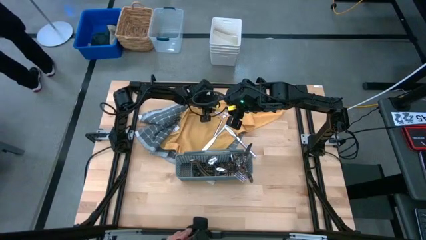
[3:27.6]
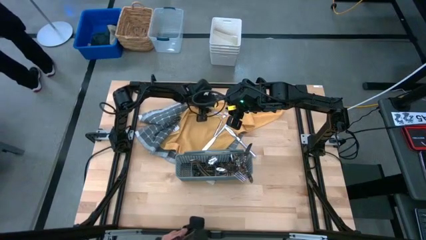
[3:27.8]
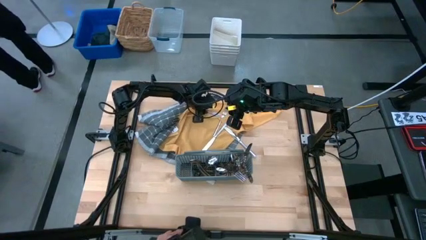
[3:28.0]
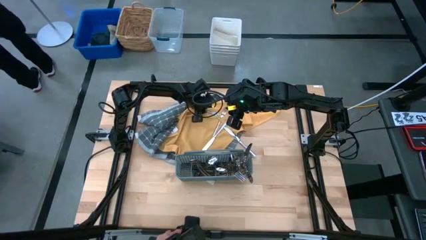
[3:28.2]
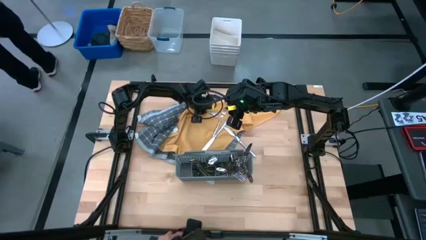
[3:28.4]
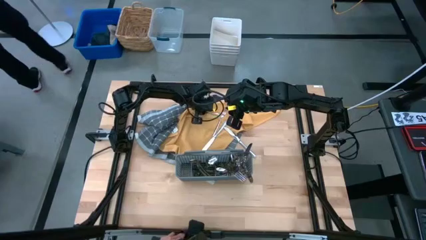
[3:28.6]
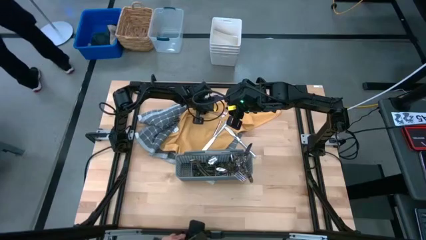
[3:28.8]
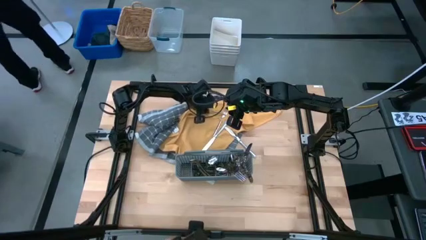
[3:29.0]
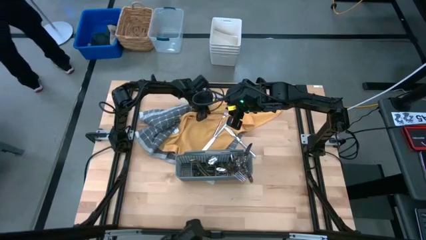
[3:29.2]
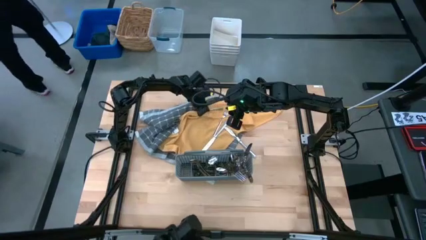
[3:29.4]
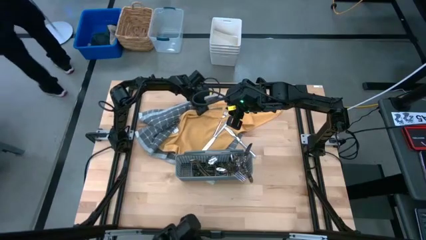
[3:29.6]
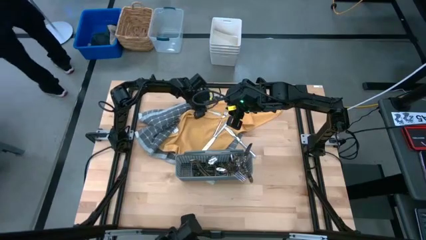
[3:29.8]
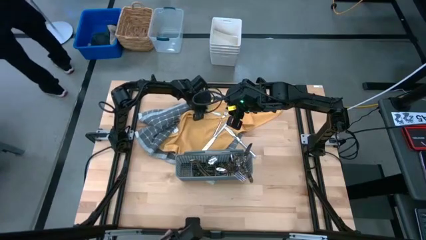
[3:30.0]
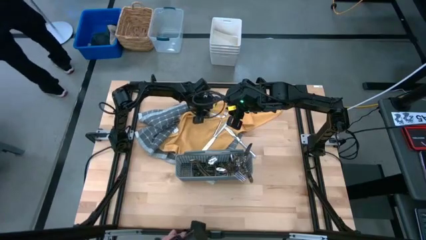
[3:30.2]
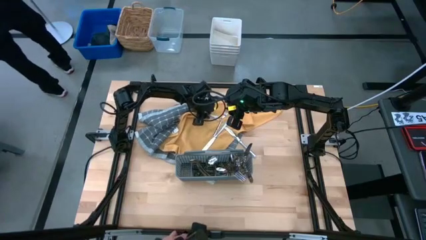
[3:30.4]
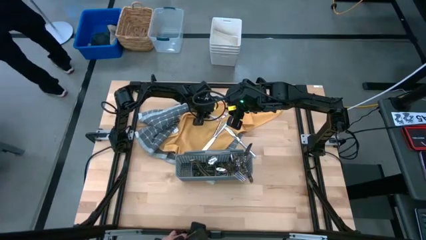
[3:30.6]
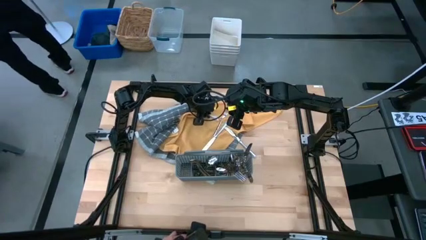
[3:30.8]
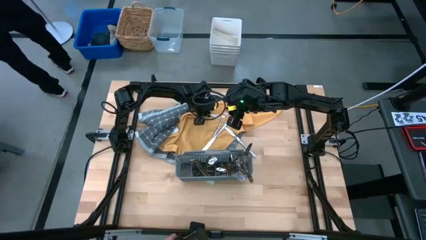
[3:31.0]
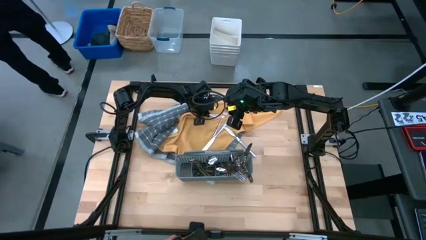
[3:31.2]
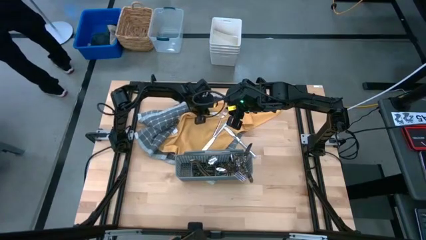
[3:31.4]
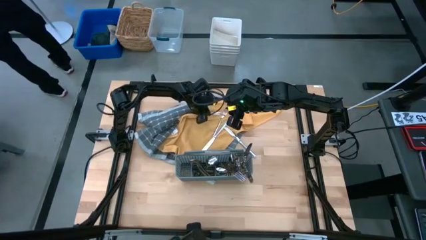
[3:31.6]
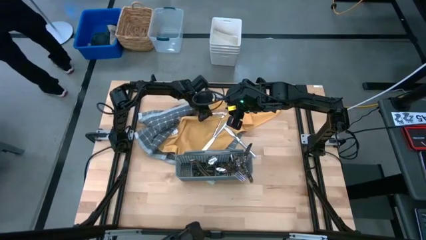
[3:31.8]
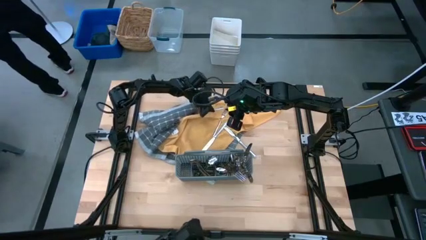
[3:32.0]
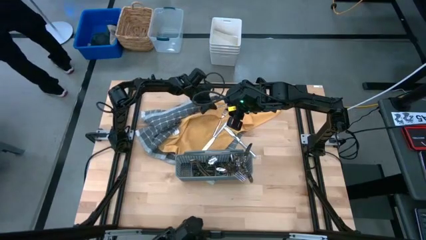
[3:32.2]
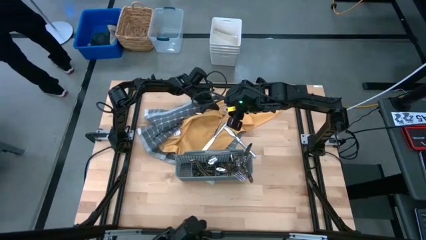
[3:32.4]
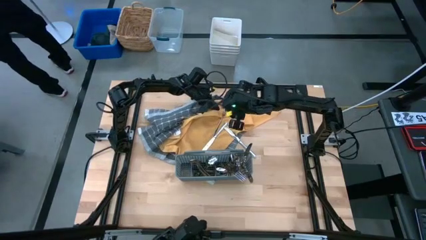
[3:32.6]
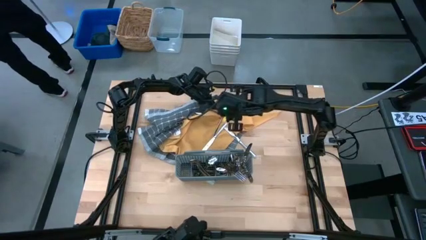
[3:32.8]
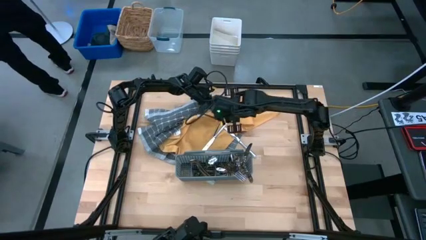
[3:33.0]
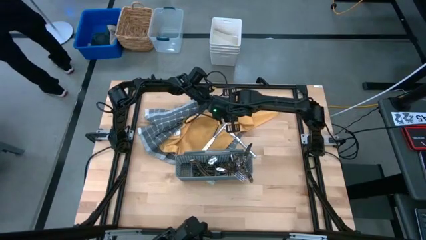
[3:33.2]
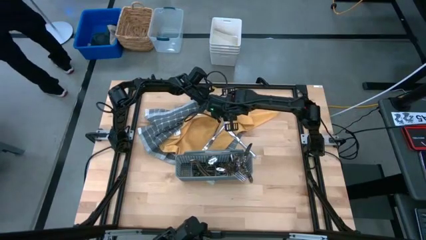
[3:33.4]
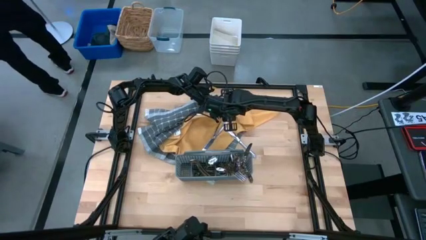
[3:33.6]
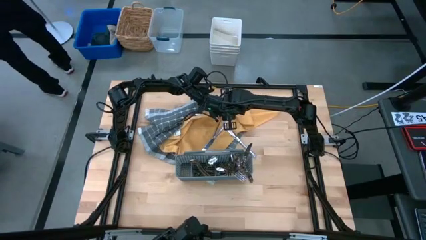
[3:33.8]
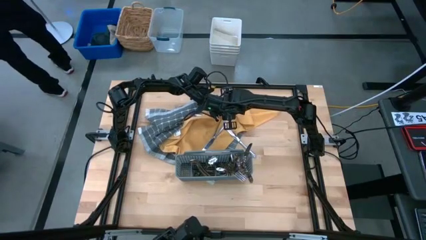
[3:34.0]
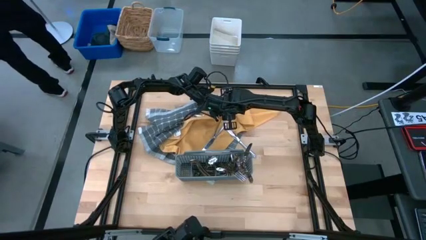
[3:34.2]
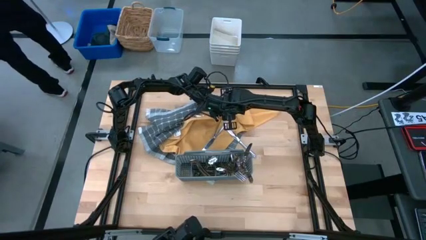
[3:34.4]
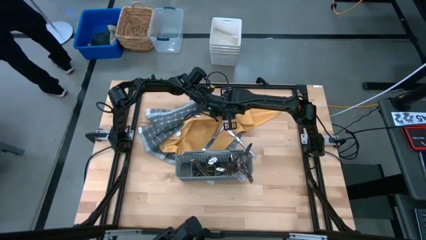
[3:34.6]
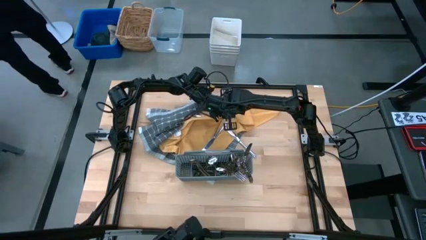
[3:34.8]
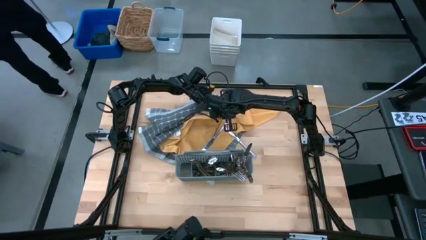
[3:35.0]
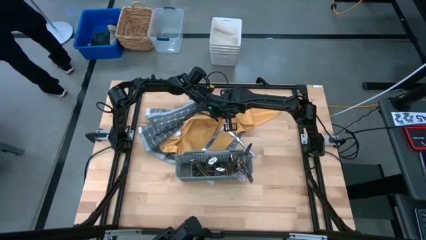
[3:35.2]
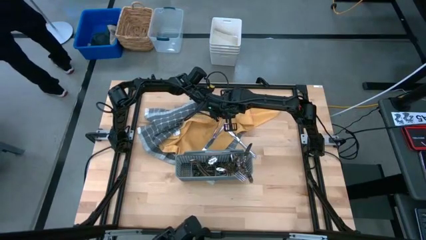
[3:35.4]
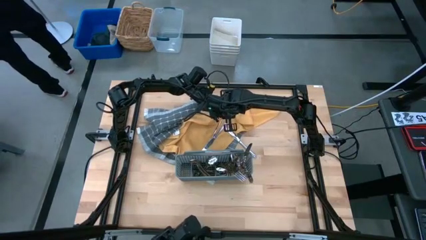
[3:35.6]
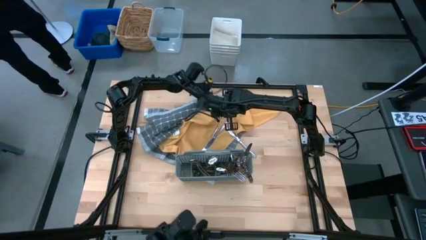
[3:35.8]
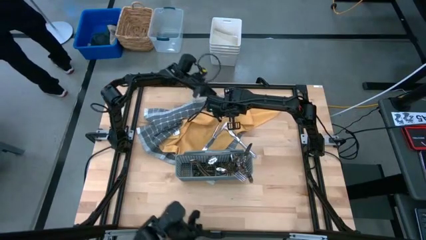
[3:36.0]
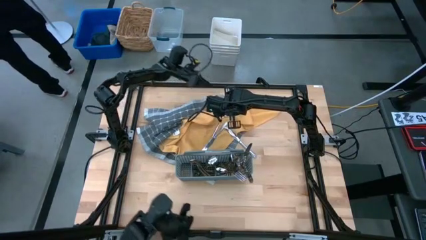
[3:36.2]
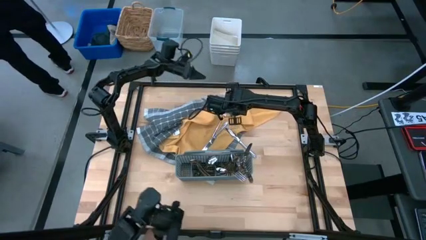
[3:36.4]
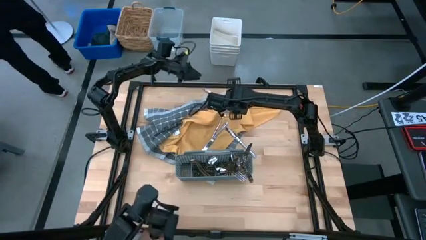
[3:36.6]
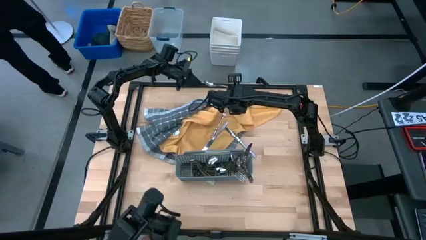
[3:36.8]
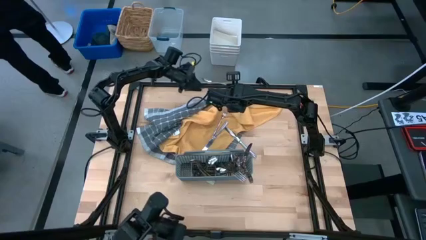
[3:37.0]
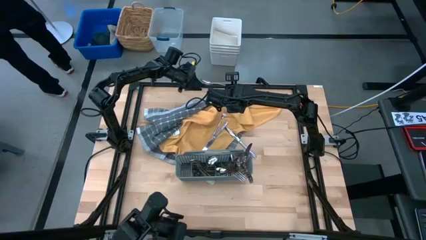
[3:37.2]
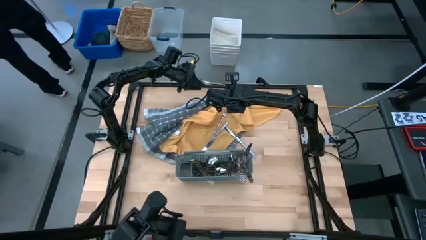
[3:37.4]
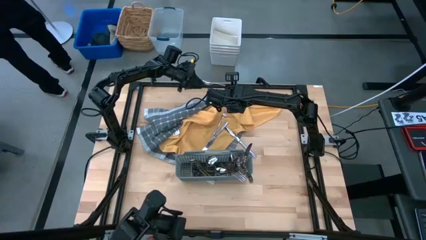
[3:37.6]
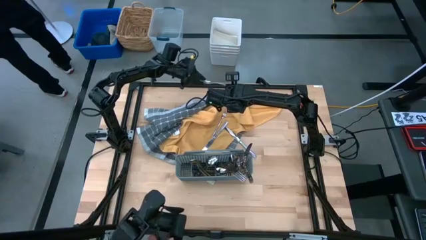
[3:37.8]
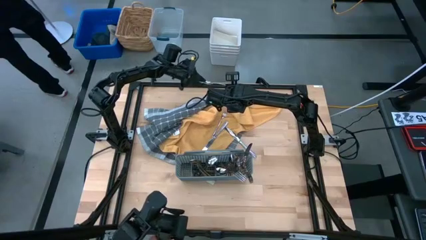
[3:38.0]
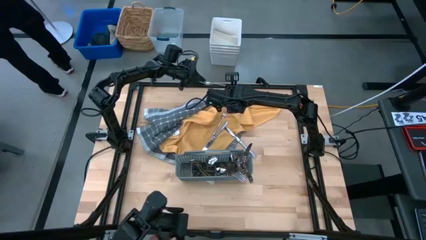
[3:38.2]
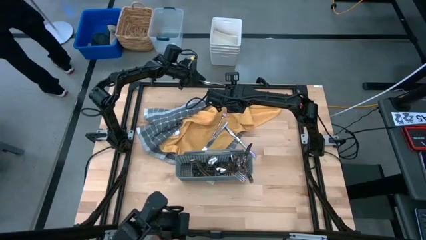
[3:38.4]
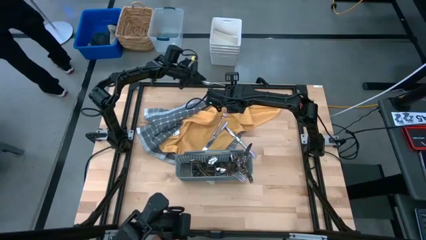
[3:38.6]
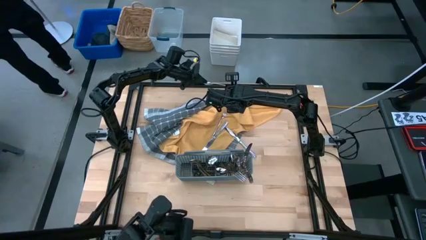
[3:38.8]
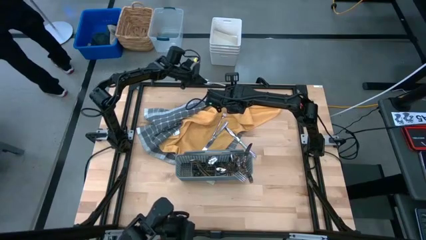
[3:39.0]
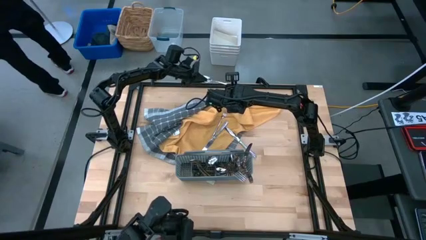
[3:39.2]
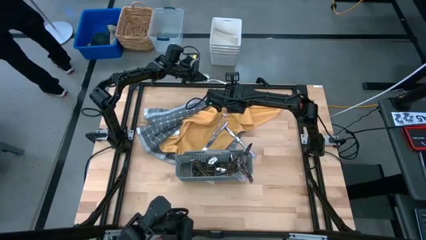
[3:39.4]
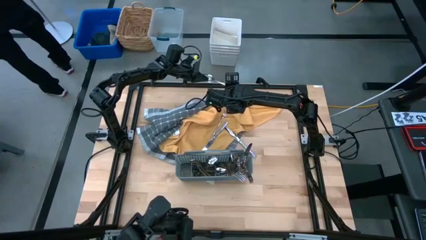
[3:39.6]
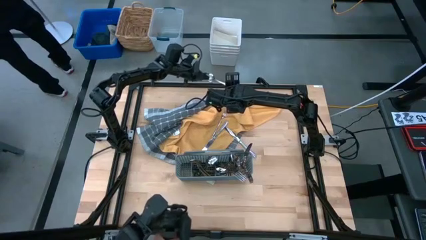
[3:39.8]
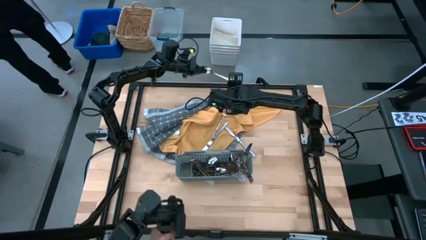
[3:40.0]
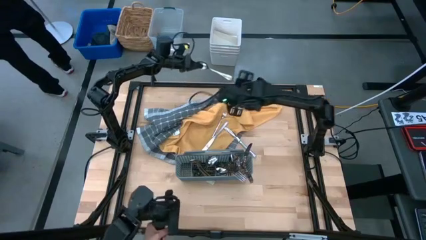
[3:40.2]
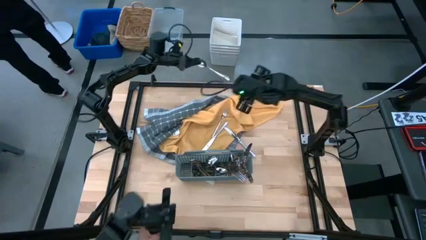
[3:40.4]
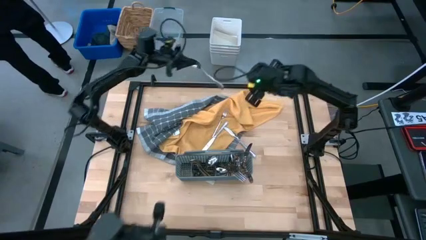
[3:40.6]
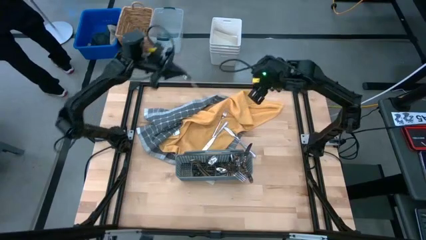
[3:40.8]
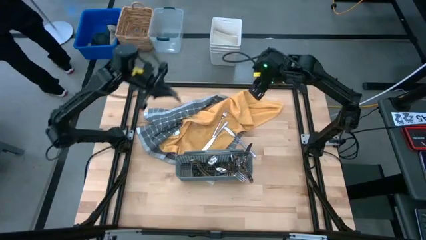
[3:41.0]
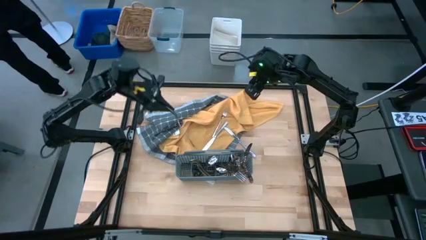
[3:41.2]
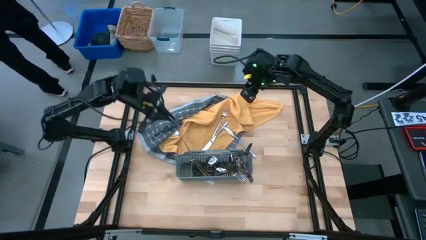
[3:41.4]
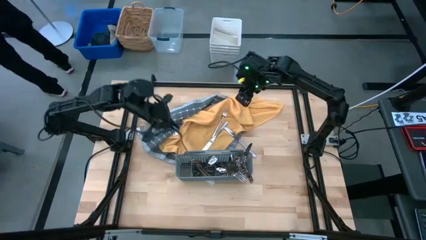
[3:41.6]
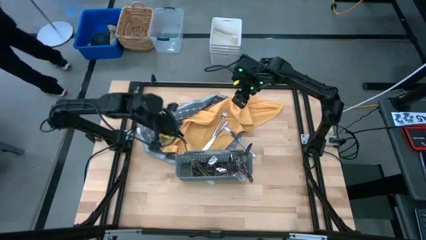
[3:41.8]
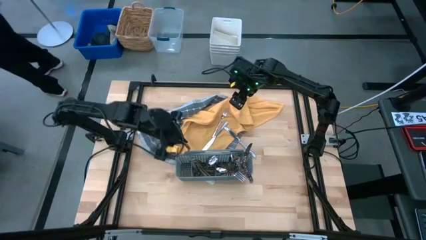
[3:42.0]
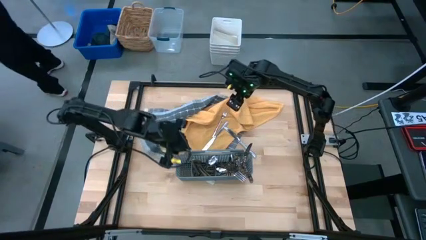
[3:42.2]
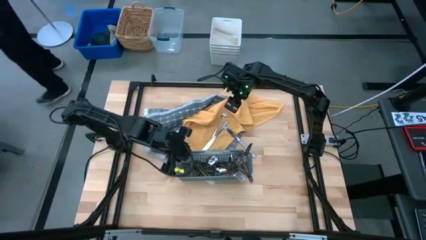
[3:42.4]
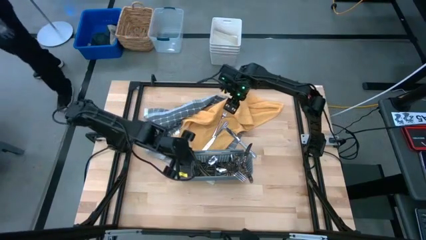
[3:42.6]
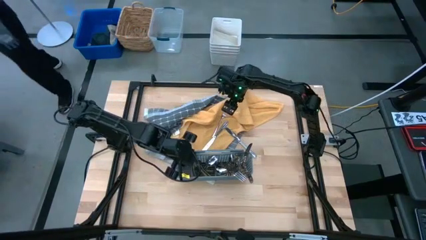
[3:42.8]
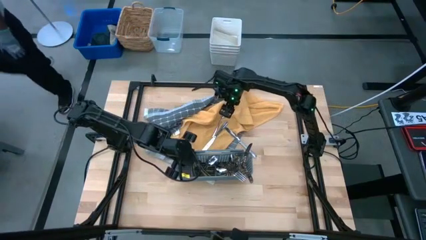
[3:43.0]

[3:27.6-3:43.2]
Task: Sort silverware
Put the silver spoon into the gray silverware basket
